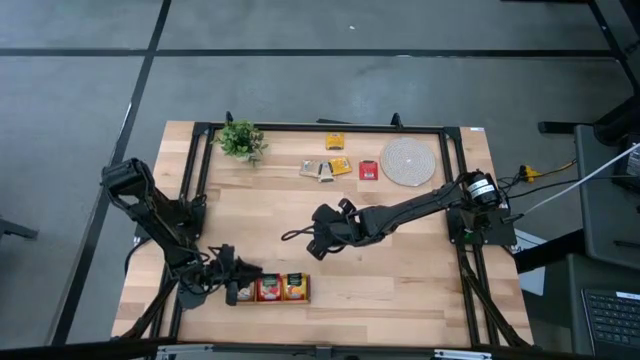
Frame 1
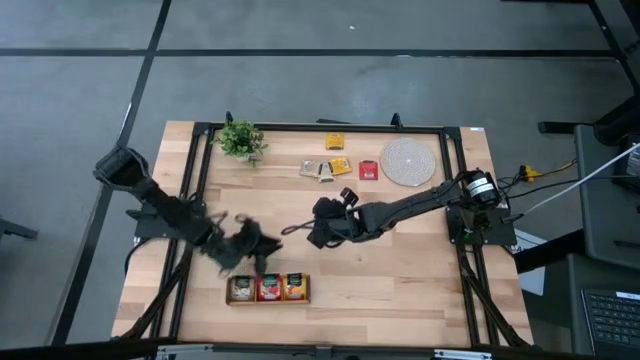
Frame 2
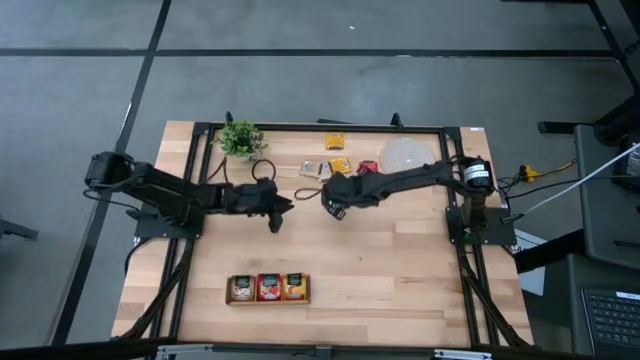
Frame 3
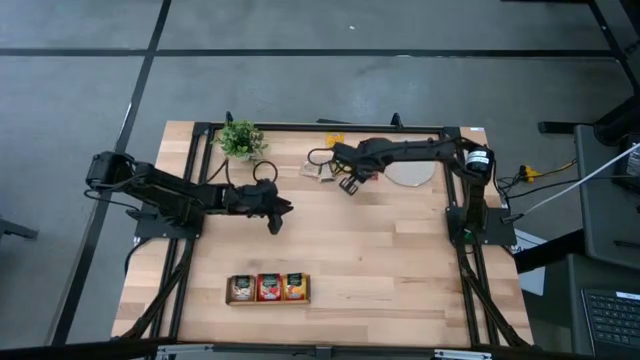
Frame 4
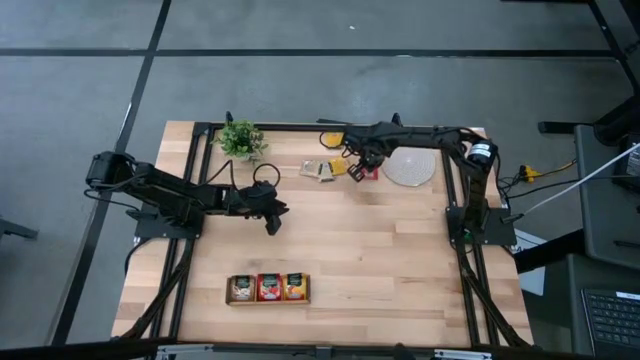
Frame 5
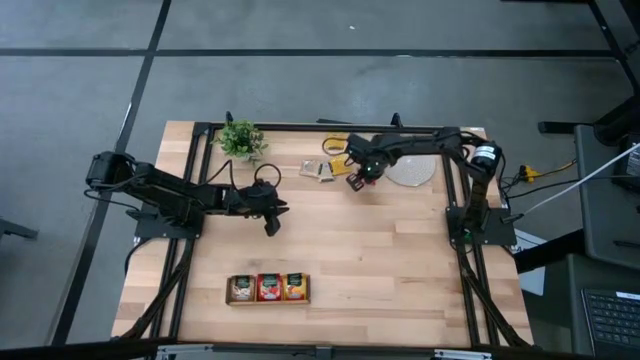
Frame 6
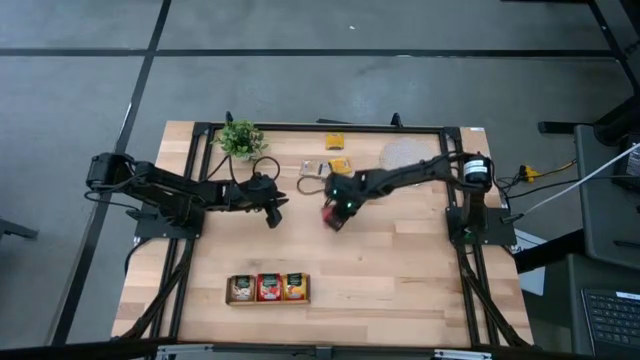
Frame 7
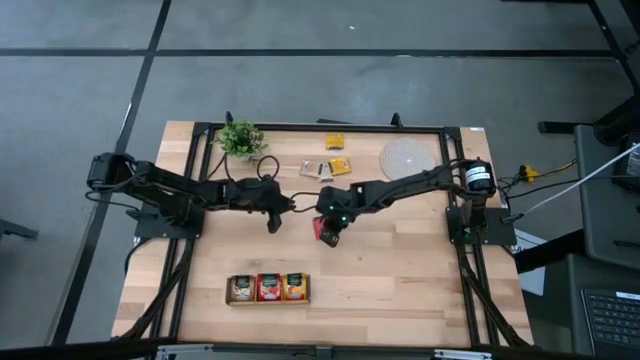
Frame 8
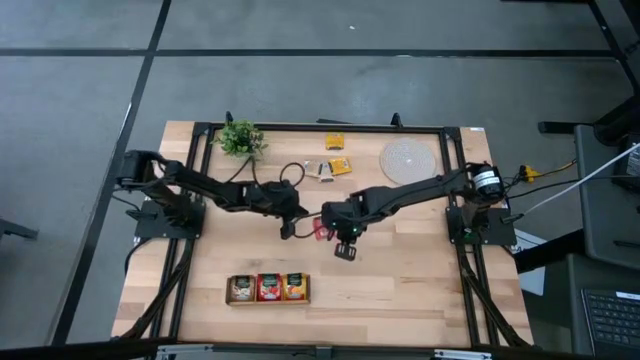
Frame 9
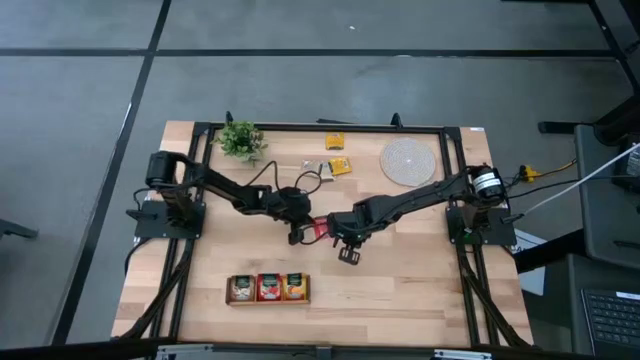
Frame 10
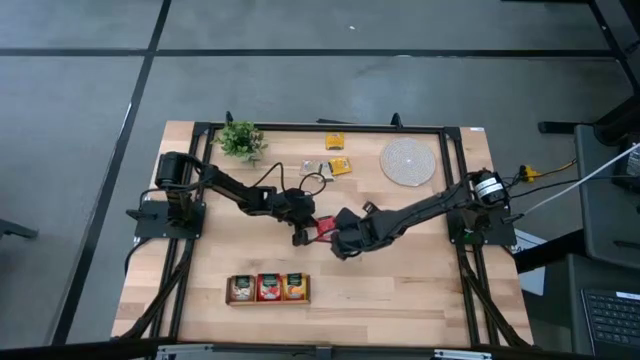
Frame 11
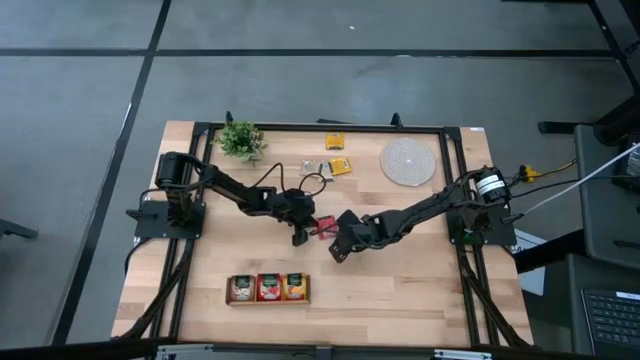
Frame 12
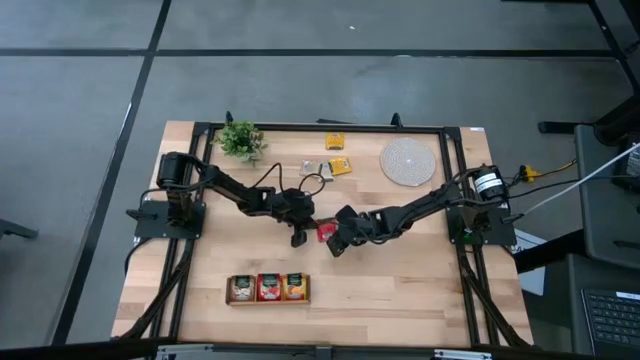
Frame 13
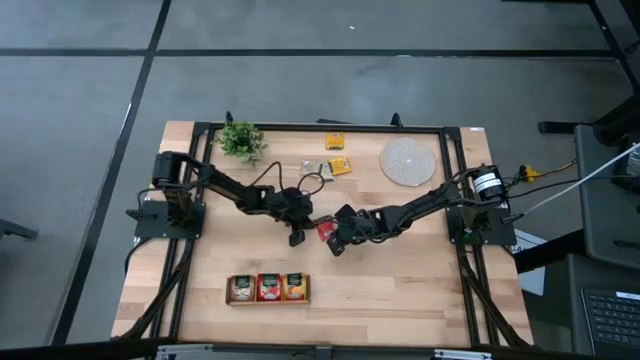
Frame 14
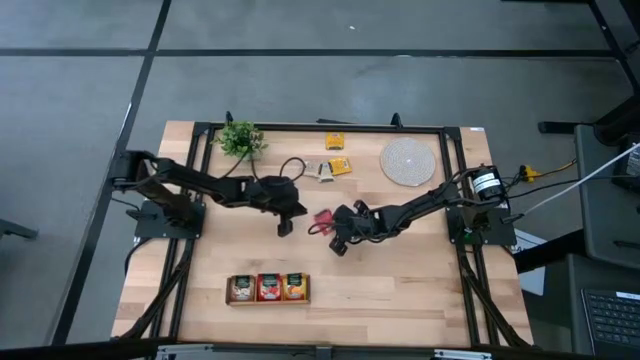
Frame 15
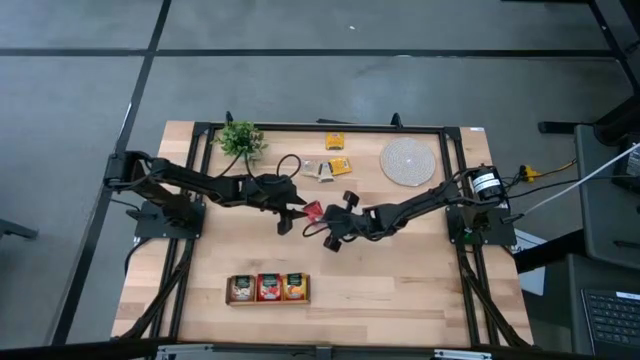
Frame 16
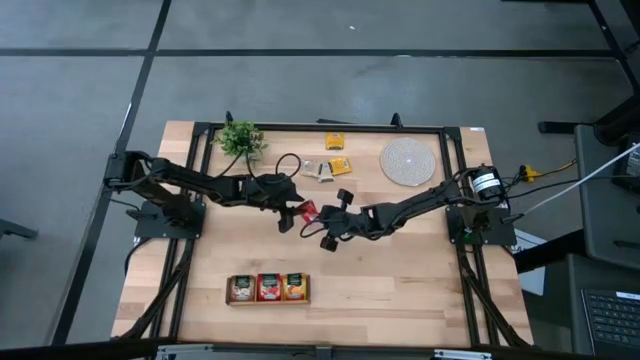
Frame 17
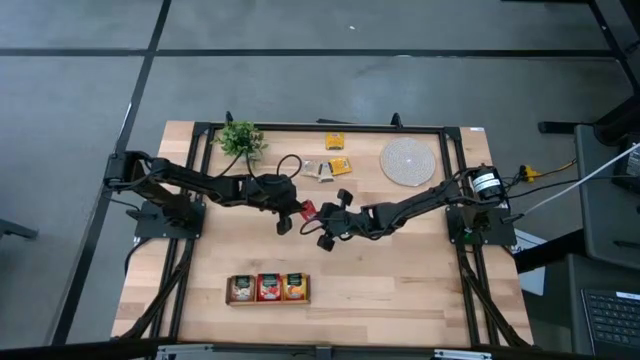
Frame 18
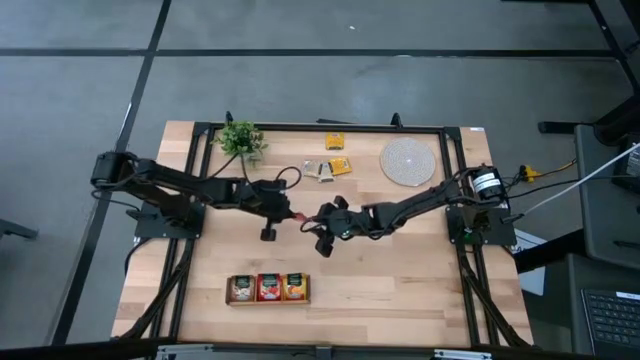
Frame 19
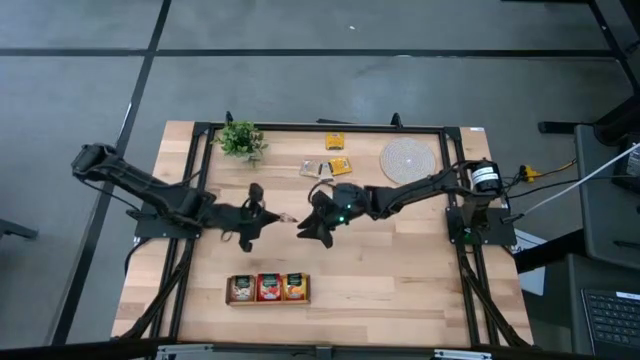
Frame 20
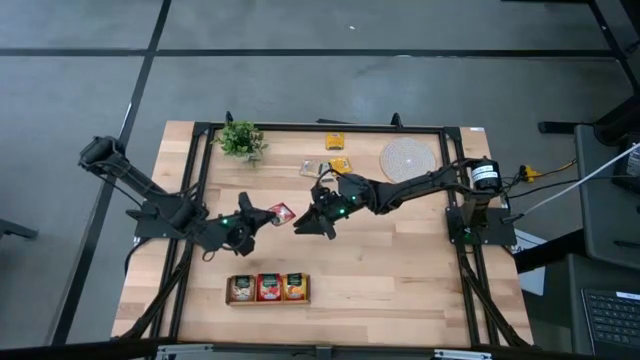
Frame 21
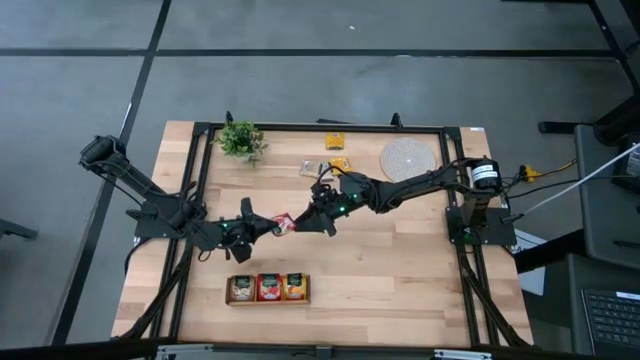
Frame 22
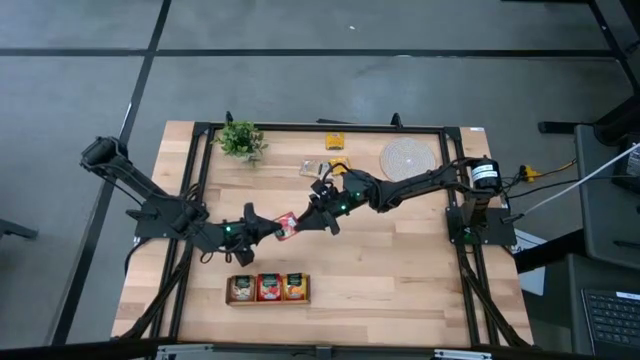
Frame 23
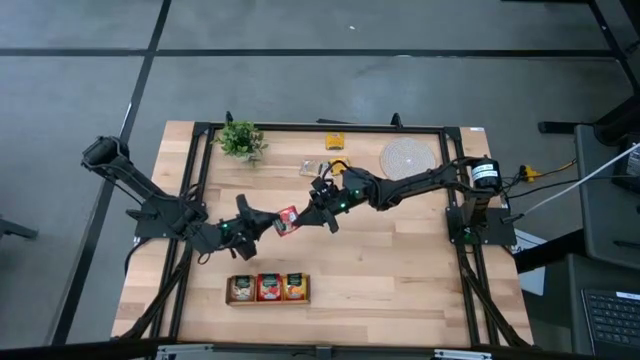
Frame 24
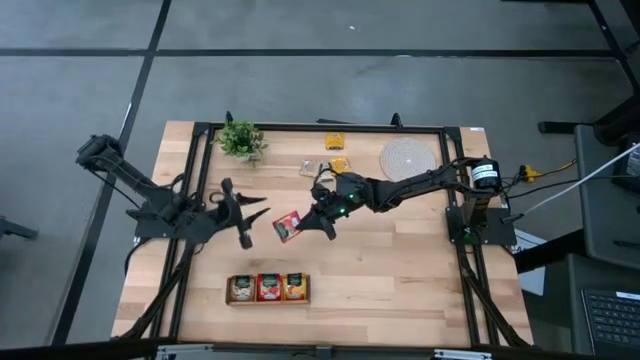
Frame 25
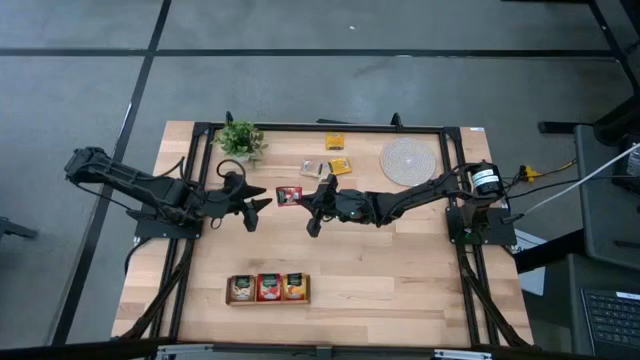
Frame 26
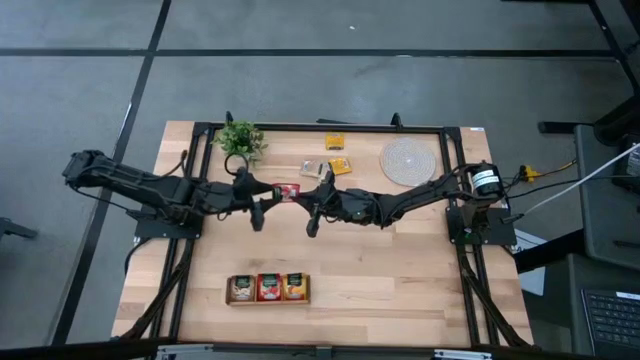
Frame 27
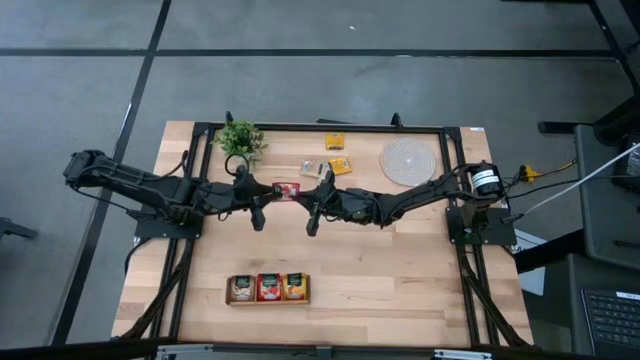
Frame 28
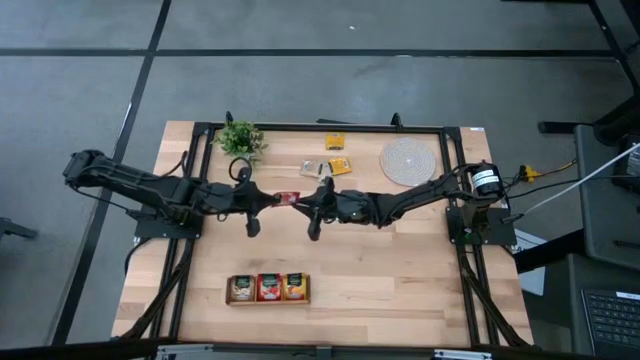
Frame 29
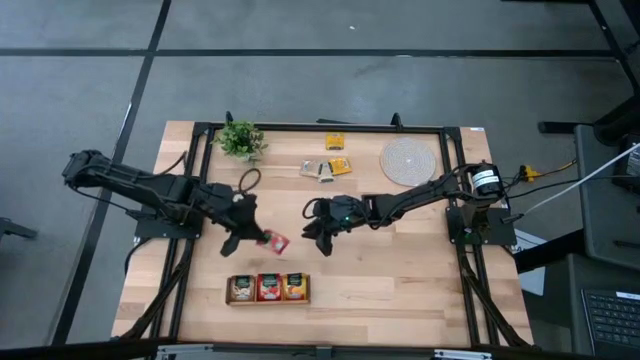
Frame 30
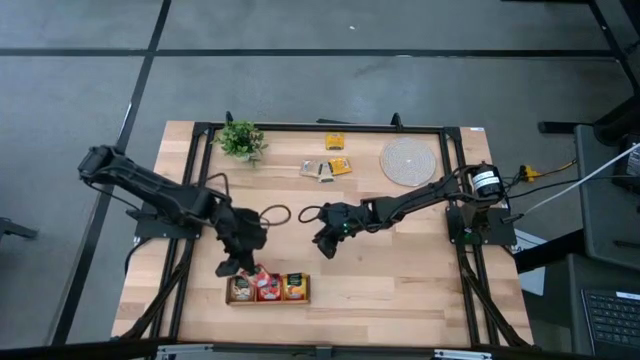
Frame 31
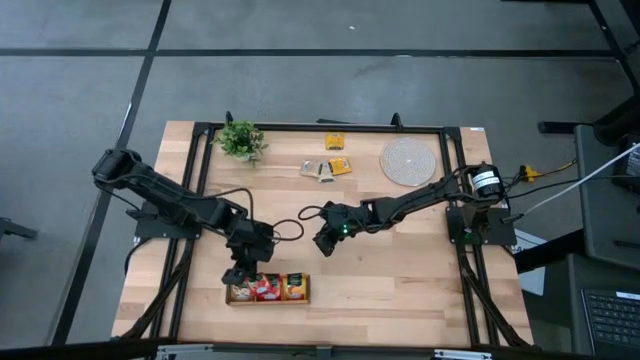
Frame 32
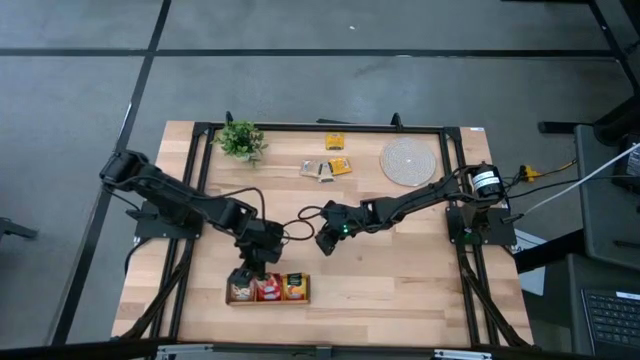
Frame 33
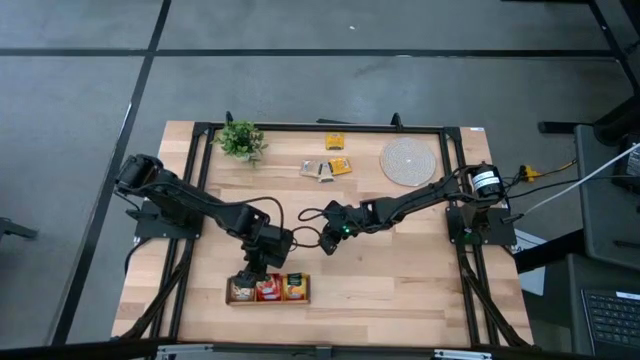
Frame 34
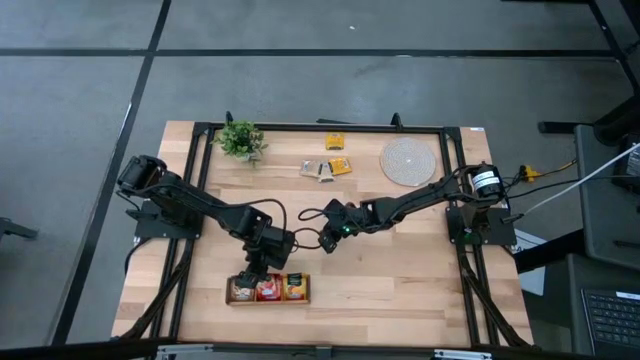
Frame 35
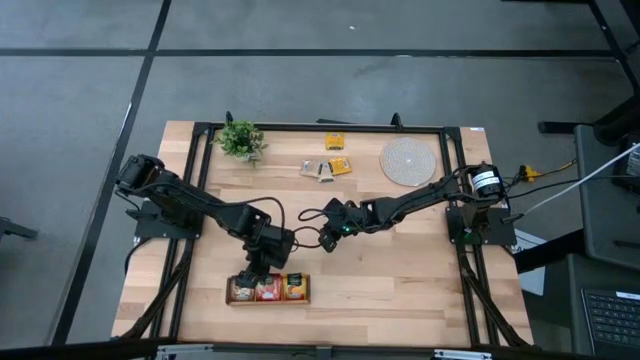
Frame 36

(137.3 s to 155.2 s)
Task: Pick & Place Tea
Put the red tea bag into the middle section of the wooden organizer

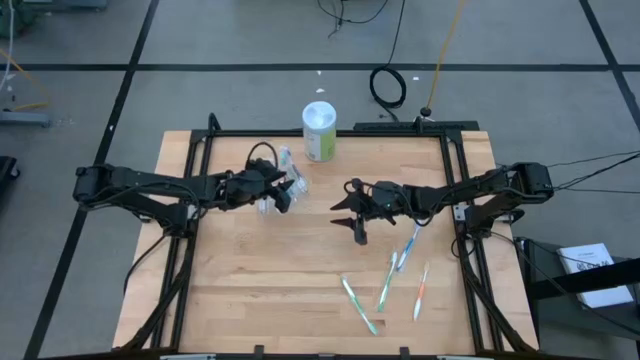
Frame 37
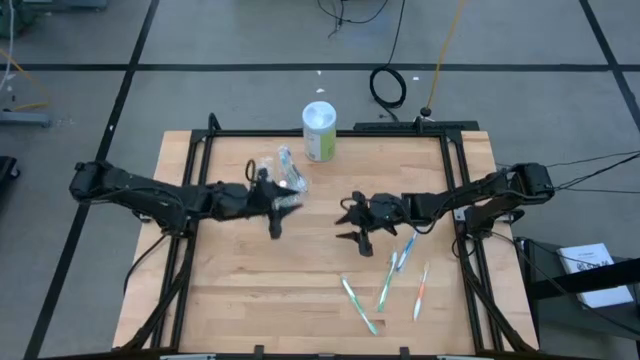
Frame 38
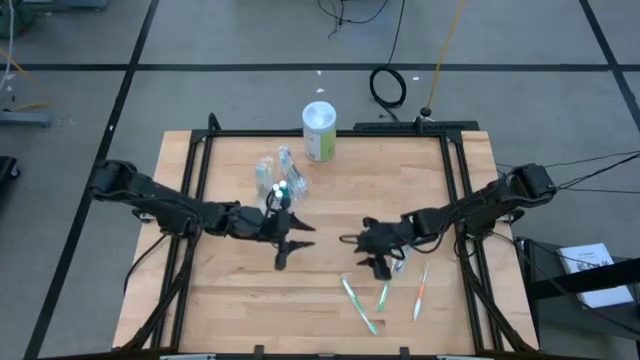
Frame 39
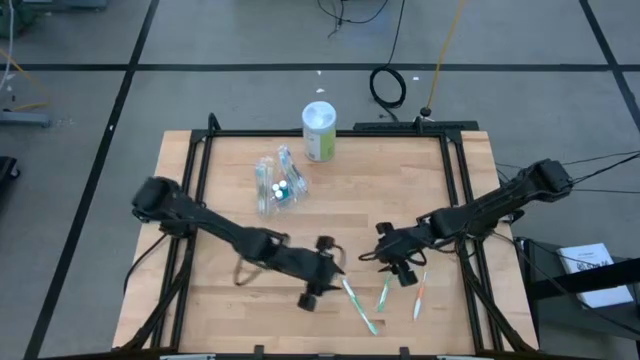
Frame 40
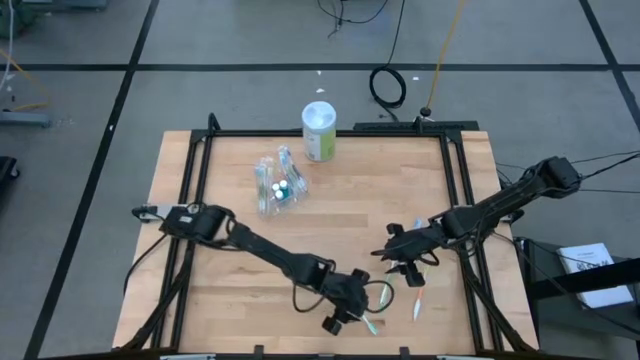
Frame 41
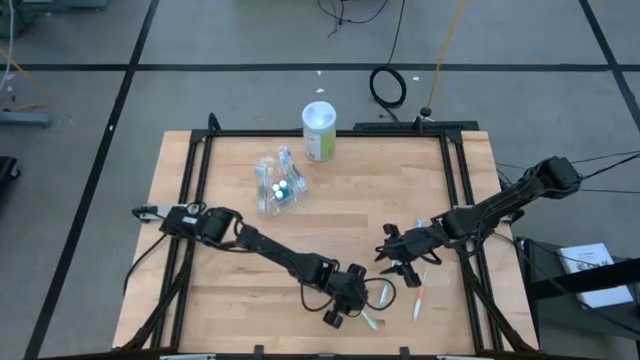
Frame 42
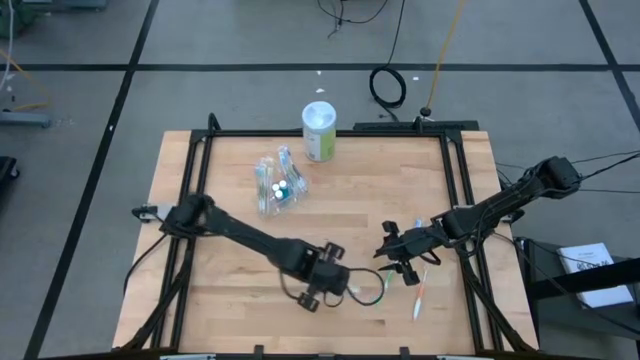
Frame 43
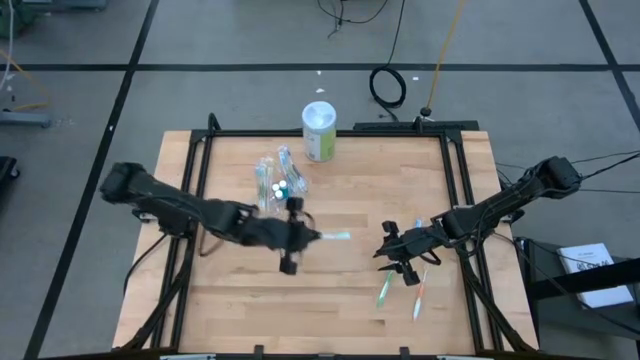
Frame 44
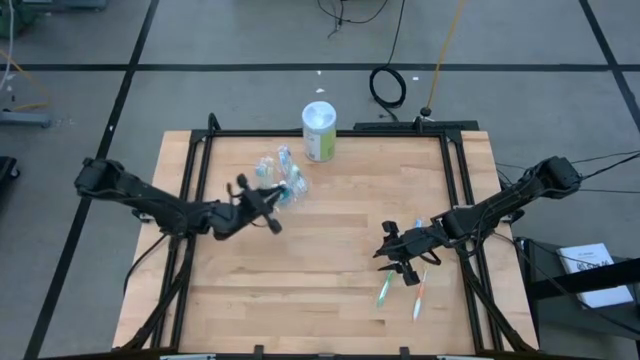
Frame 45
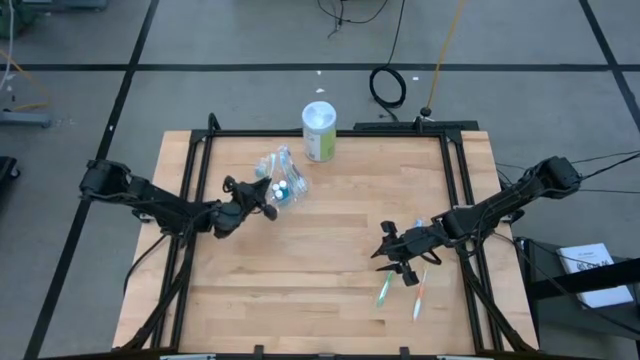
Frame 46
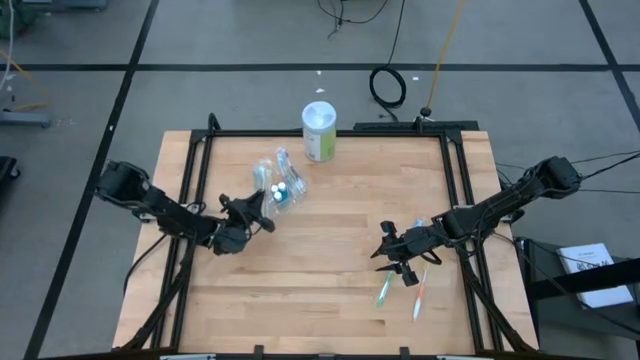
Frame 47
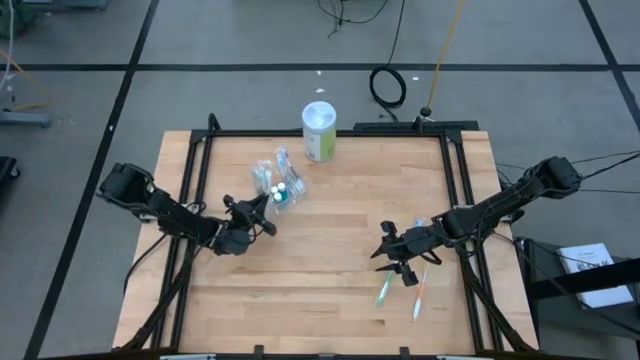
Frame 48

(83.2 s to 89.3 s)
Task: Pick & Place toothbrushing station
Put the green toothbrush into the transparent organizer
